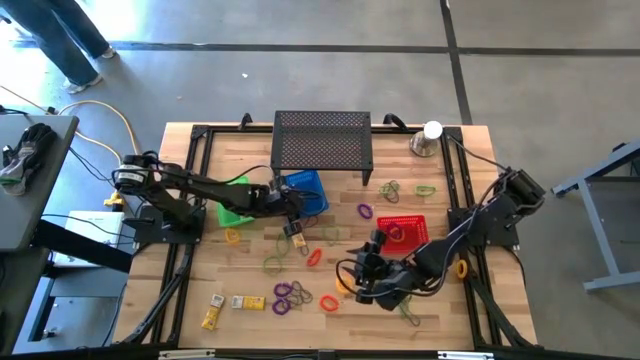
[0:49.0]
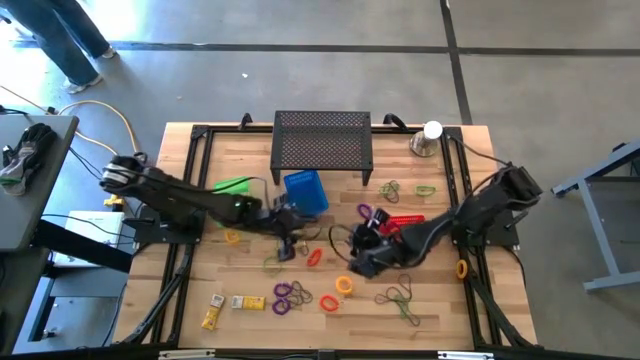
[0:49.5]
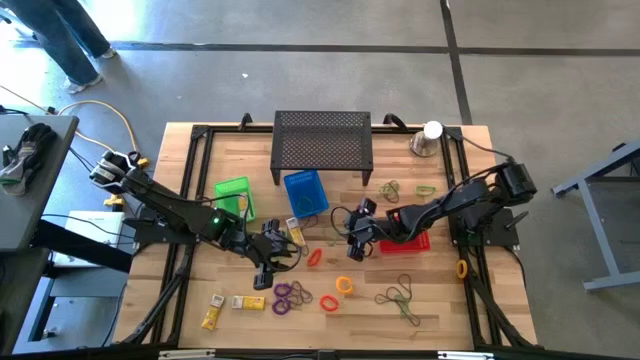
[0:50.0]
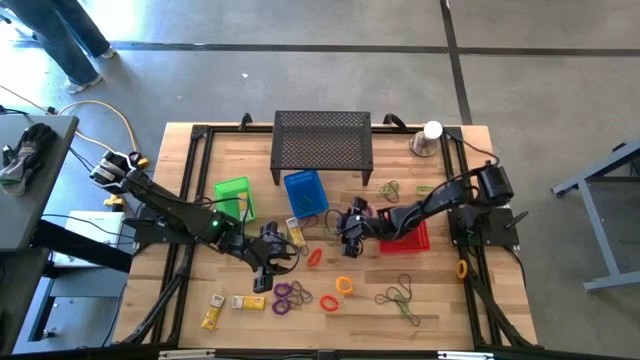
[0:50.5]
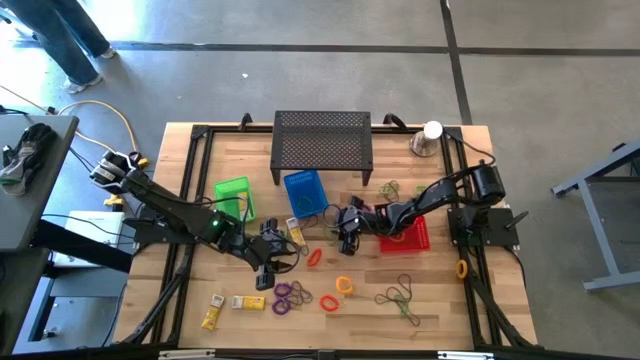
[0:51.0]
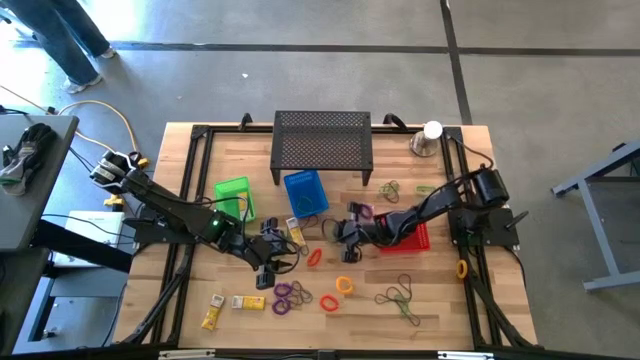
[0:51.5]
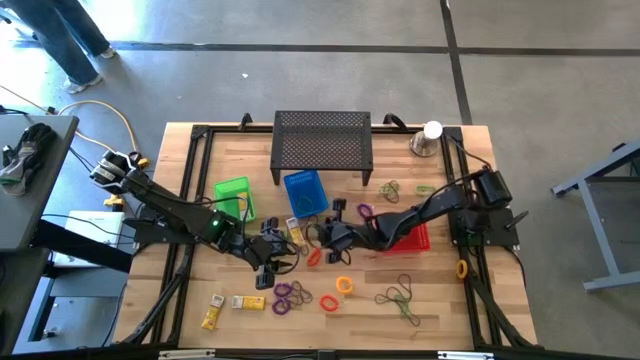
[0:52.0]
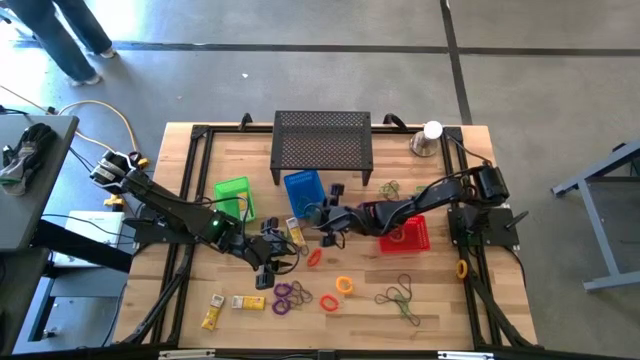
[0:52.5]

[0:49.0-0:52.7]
Task: Pick & Place Office Desk Supplies
Put the green rubber band into the blue basket

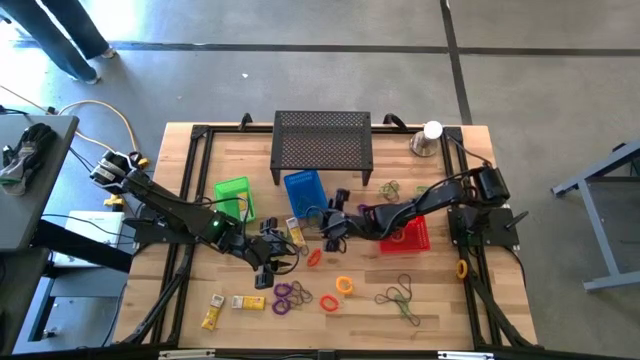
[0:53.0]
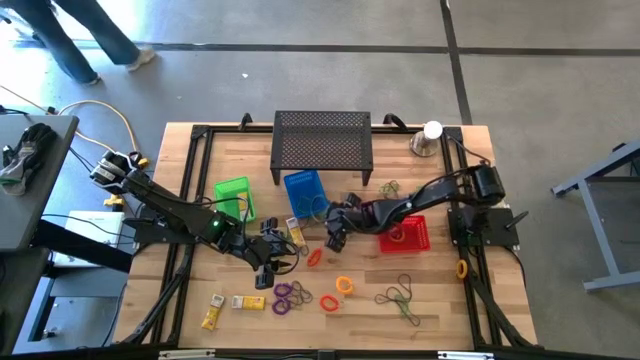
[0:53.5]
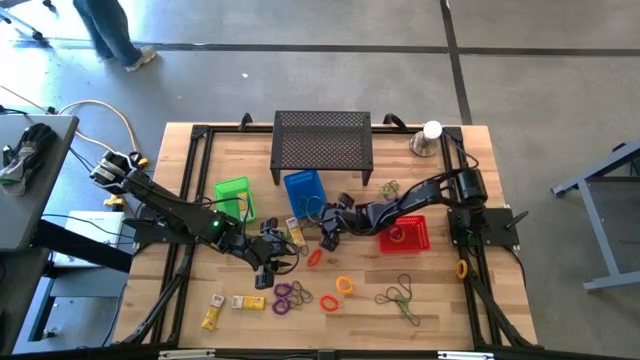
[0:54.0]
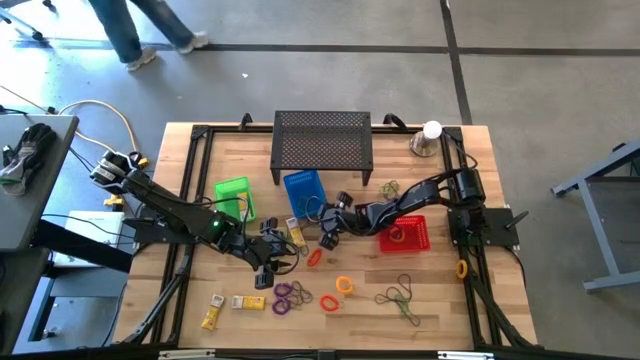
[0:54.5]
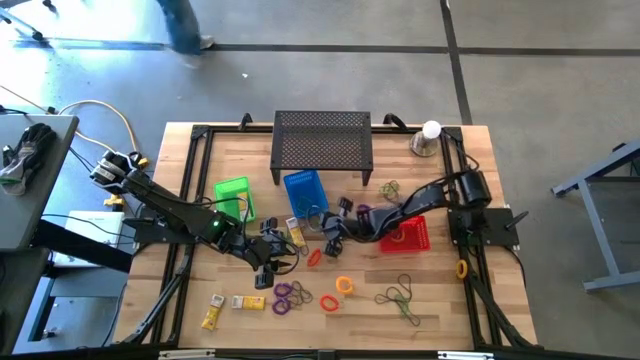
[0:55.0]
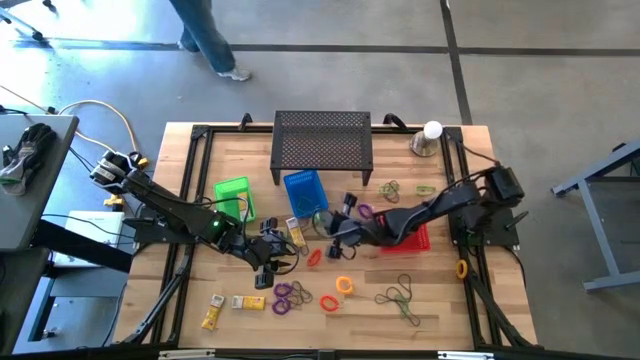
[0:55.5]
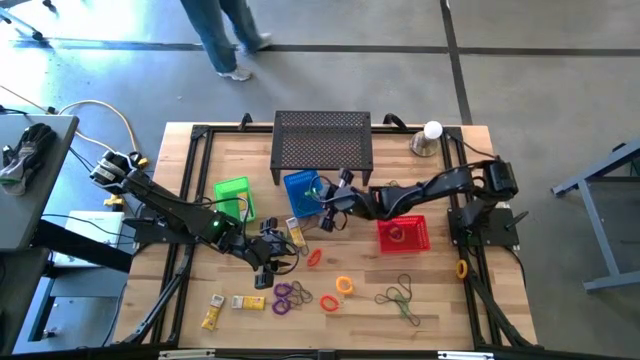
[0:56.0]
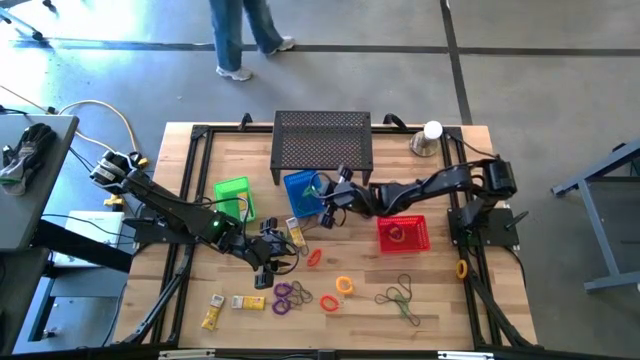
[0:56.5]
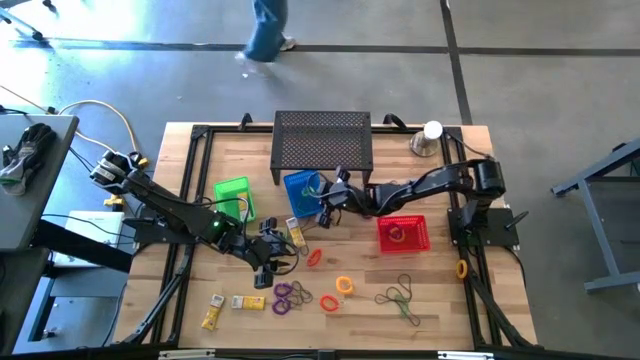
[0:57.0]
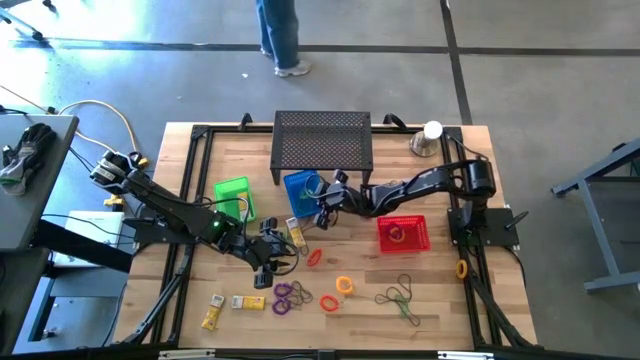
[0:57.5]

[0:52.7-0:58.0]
Put the green rubber band into the blue basket

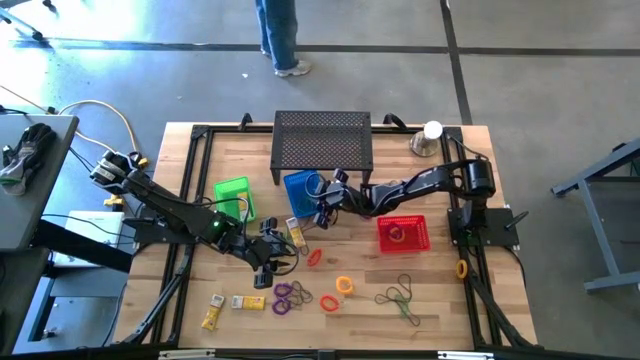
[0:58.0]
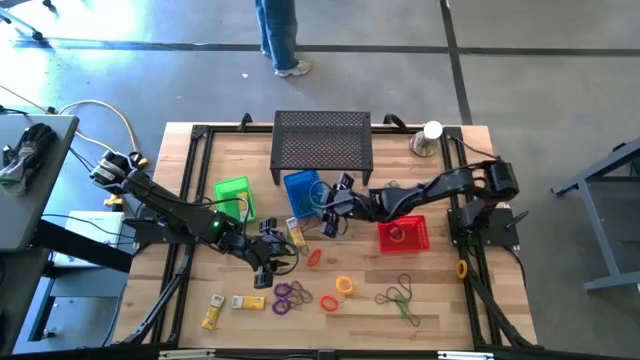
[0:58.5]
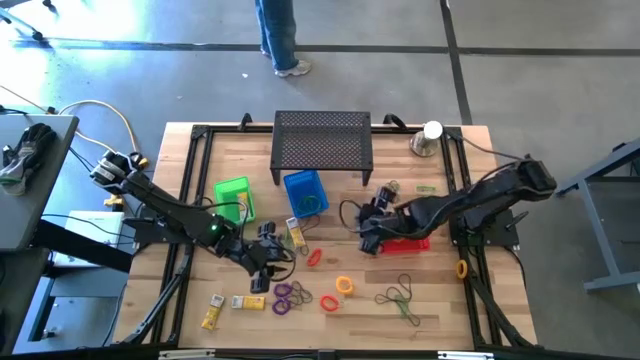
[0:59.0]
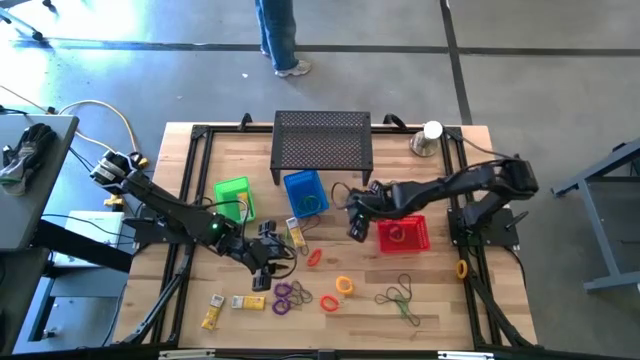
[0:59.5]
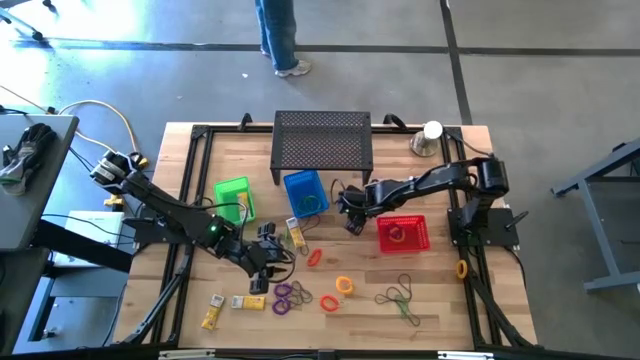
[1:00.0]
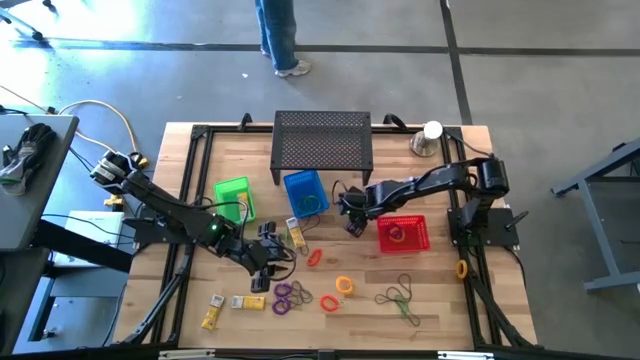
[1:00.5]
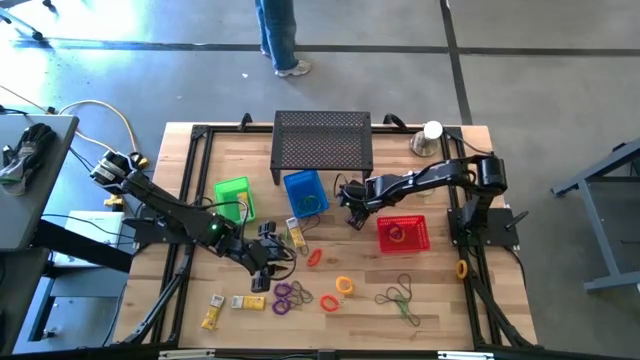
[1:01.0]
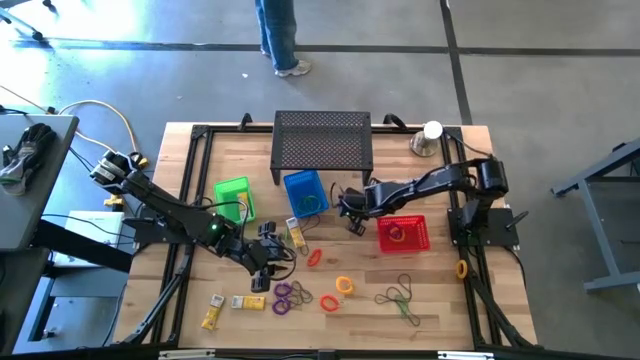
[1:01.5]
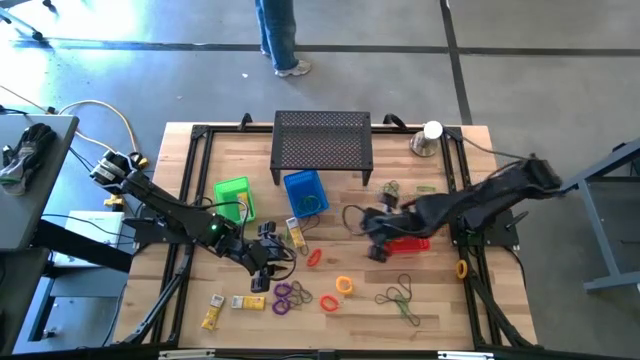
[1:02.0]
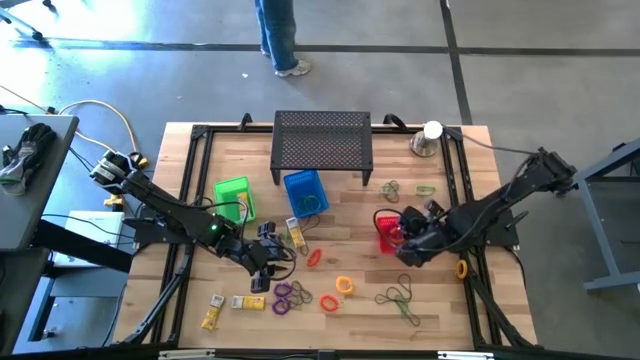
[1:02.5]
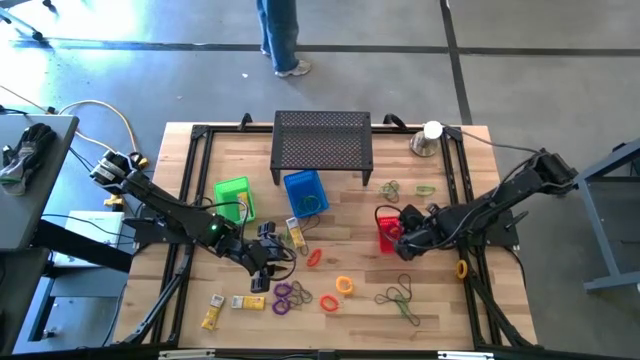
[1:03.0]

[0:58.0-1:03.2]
Put the violet spring keychain into the red basket

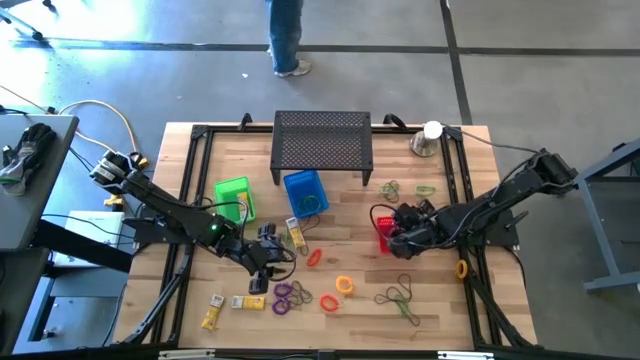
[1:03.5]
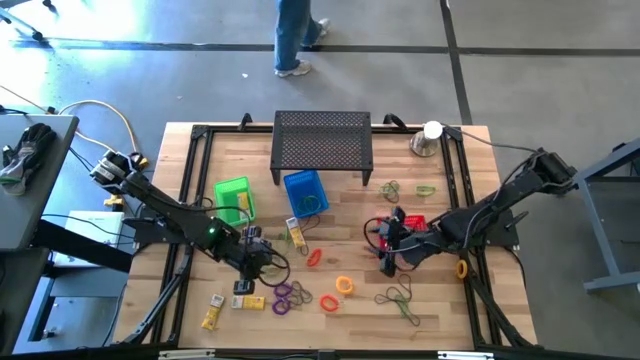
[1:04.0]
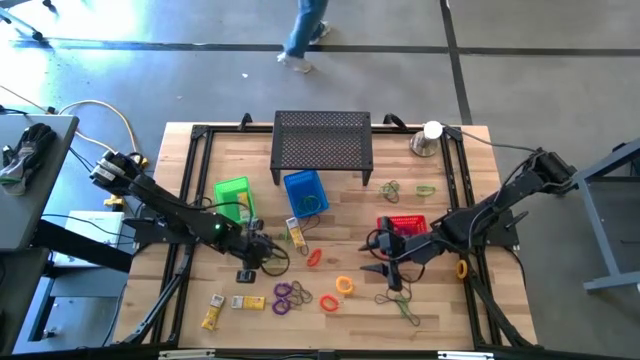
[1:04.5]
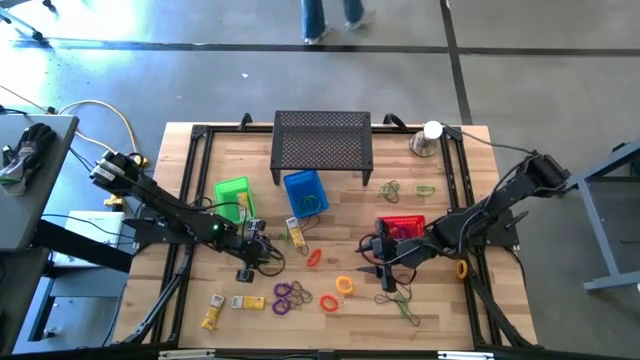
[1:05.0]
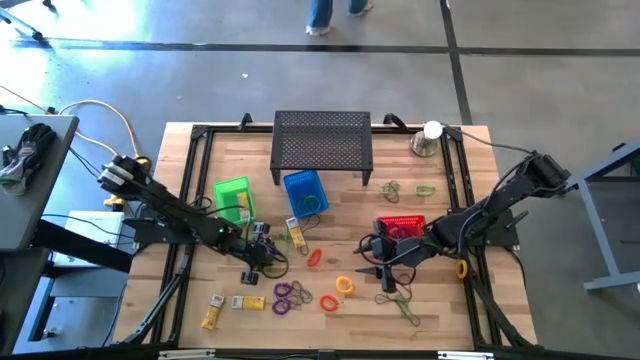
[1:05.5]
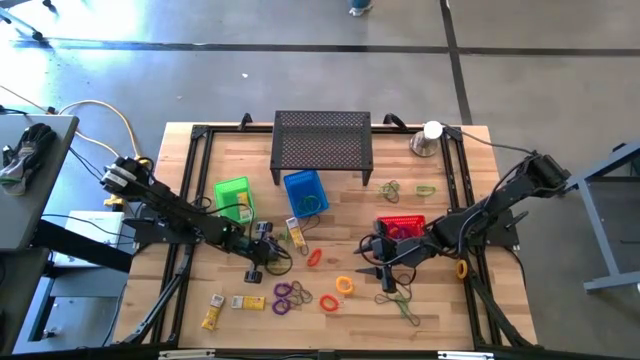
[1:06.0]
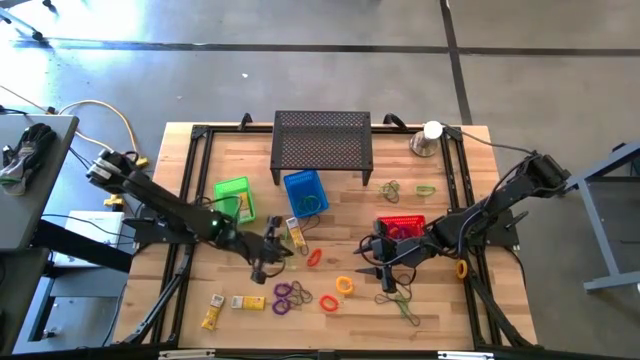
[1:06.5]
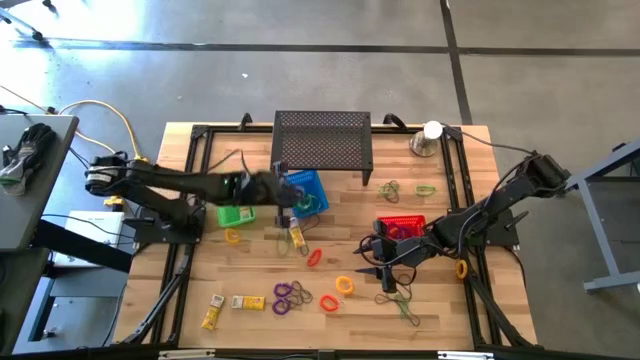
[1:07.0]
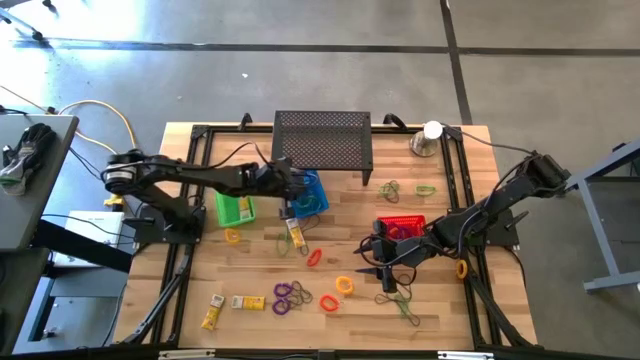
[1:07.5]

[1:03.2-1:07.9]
Put the green rubber band into the blue basket

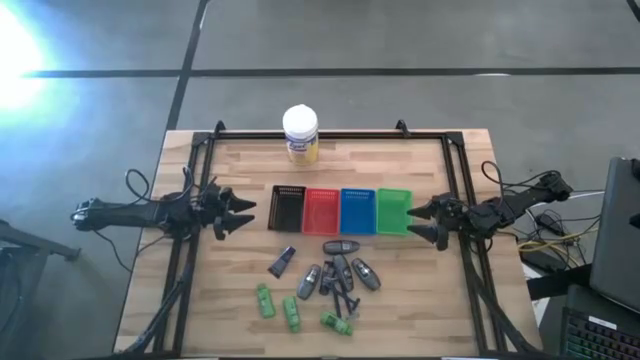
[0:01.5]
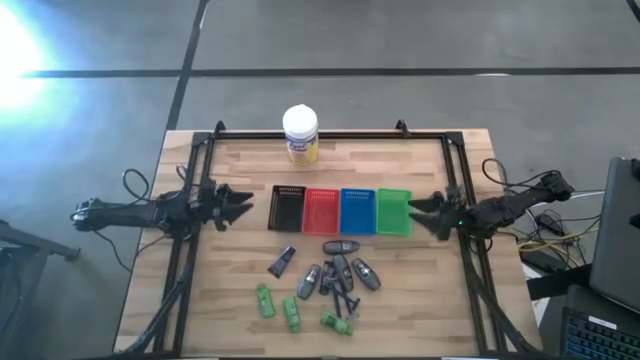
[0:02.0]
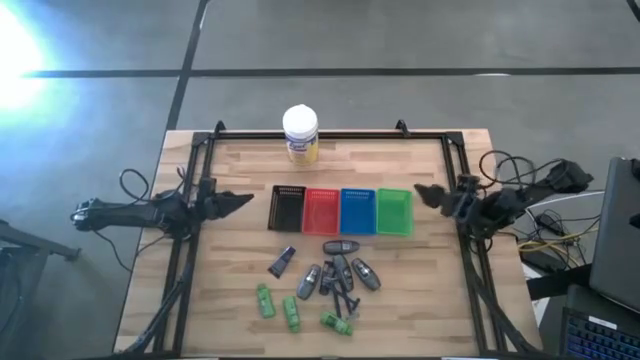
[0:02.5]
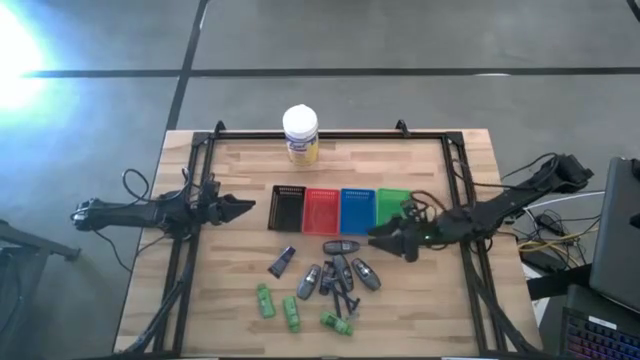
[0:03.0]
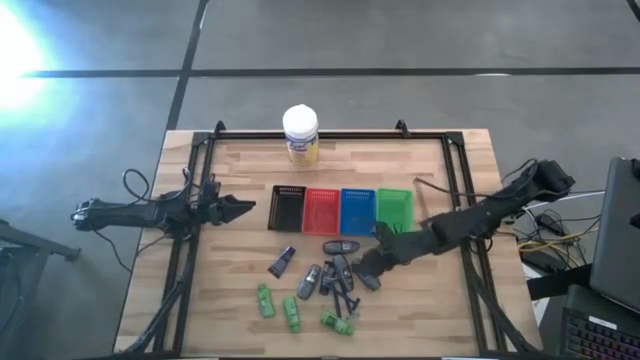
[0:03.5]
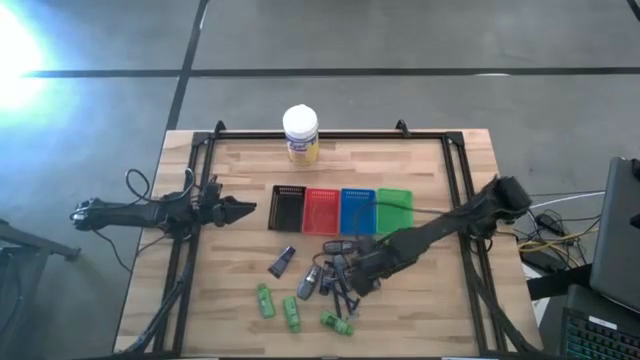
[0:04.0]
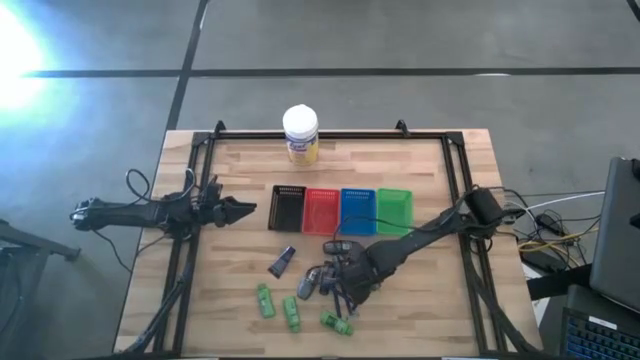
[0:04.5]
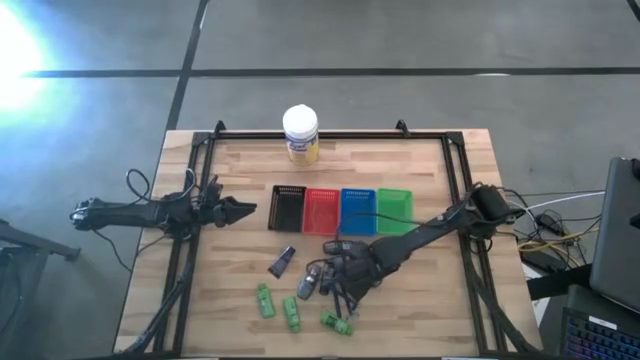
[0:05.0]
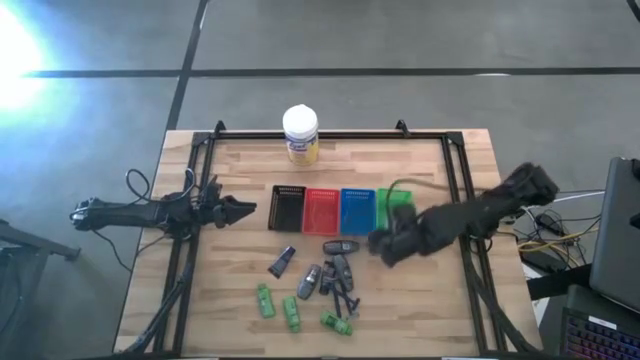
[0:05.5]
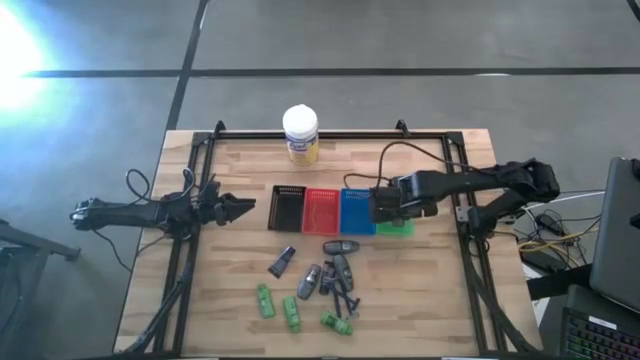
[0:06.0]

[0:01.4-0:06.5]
Task: Pick & Place Travel size toiletries
Put the gray deodorant into the green basket
